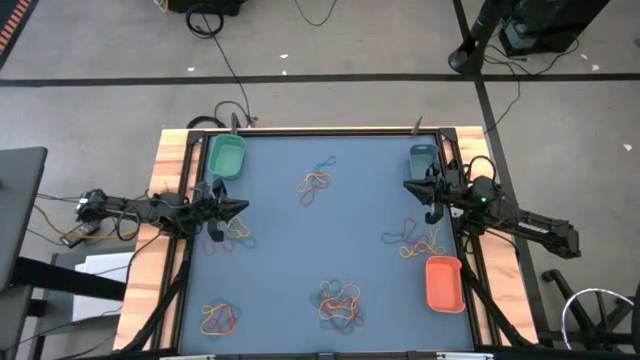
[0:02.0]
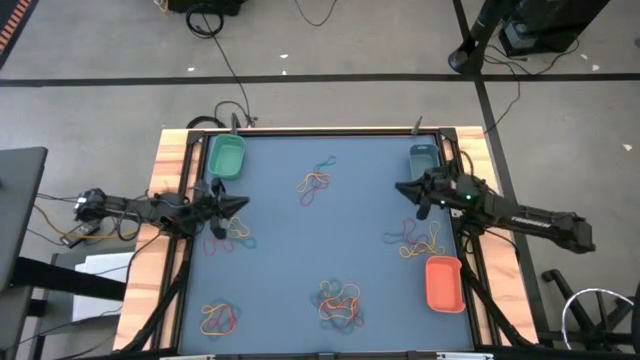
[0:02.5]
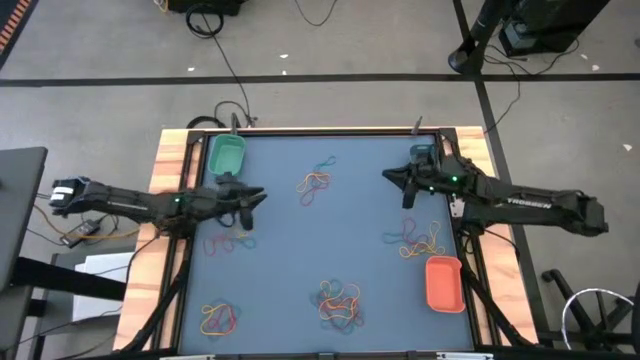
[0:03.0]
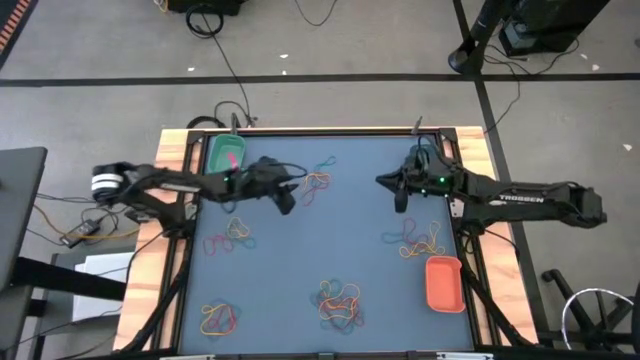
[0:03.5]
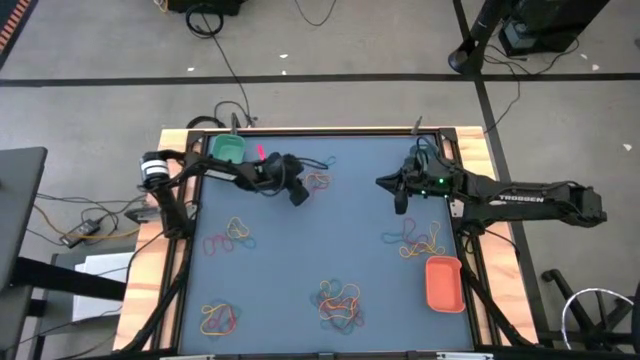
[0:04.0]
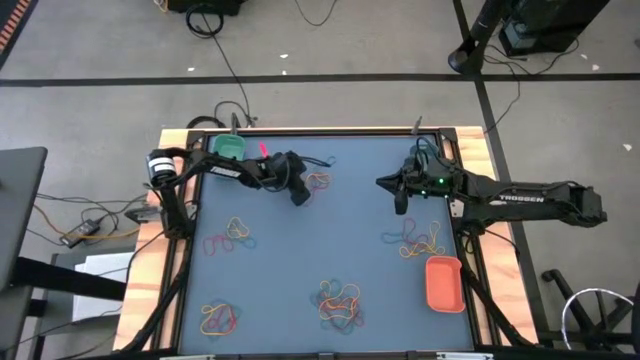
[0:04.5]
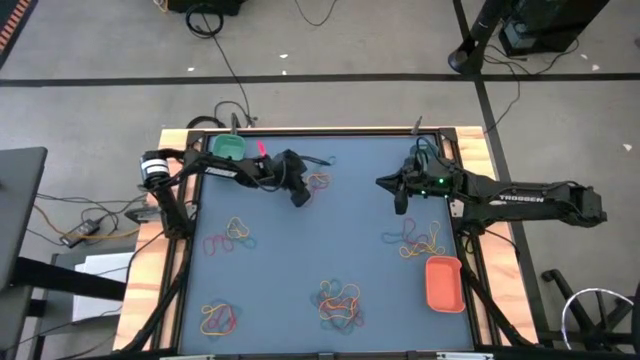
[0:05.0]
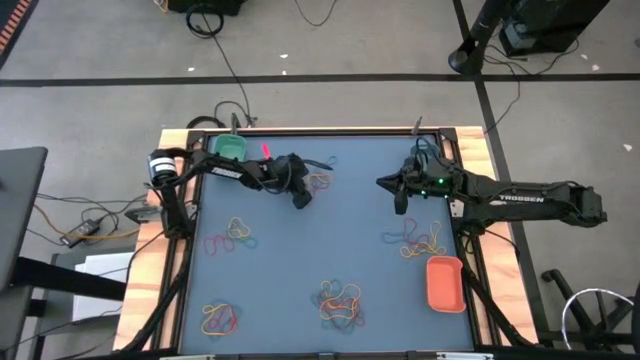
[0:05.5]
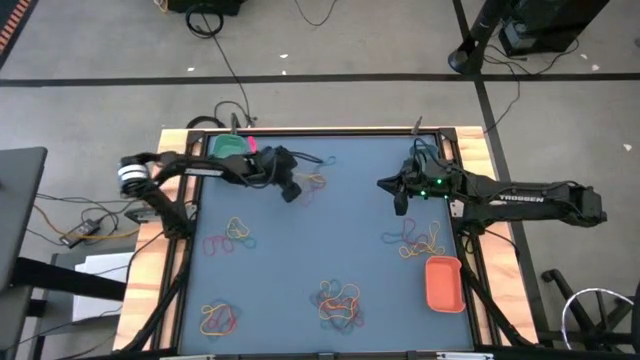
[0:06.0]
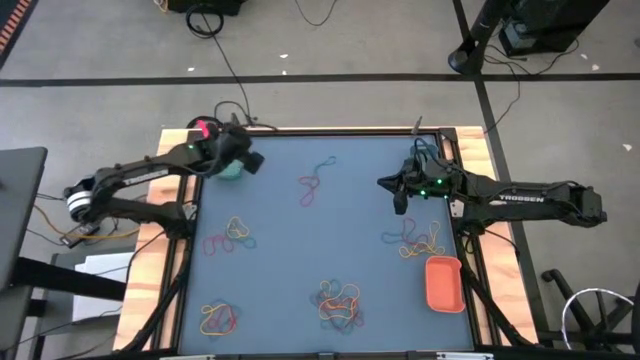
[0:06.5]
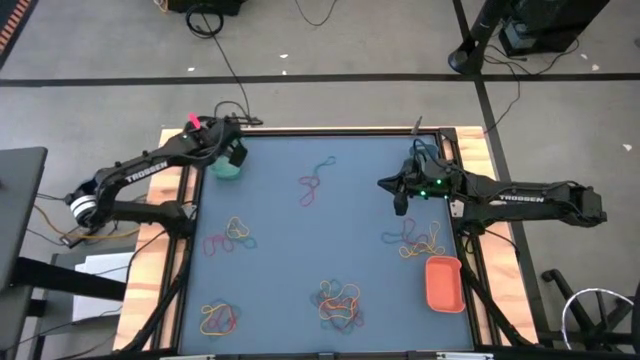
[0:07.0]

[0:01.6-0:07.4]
Task: Sort rubber bands into baskets
Put the yellow rubber band into the green bin

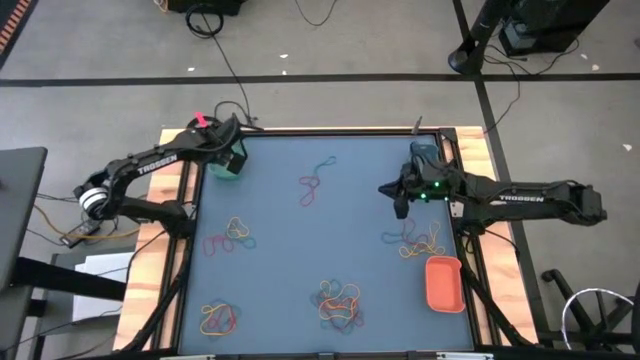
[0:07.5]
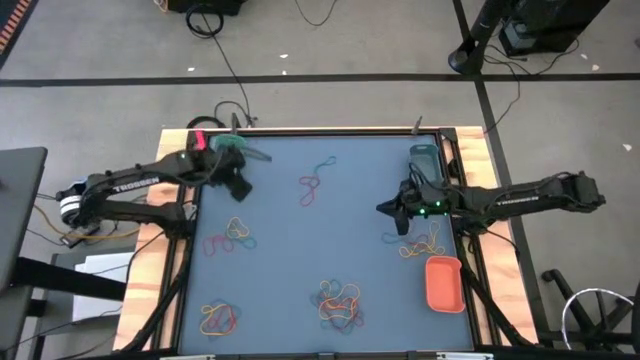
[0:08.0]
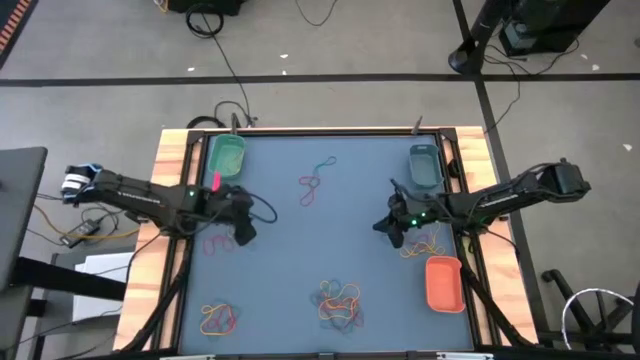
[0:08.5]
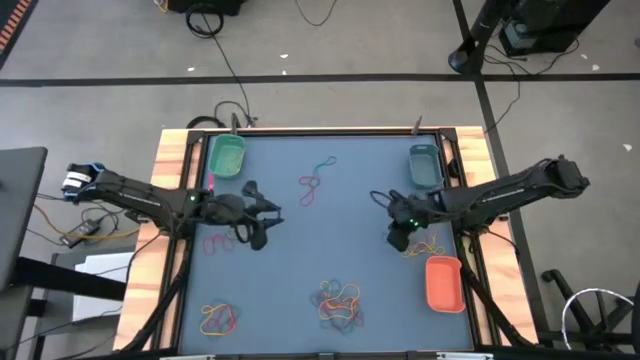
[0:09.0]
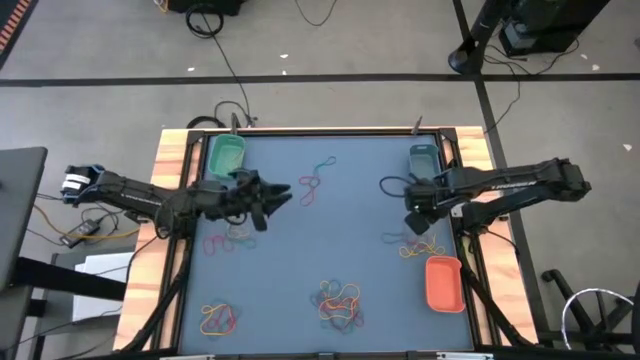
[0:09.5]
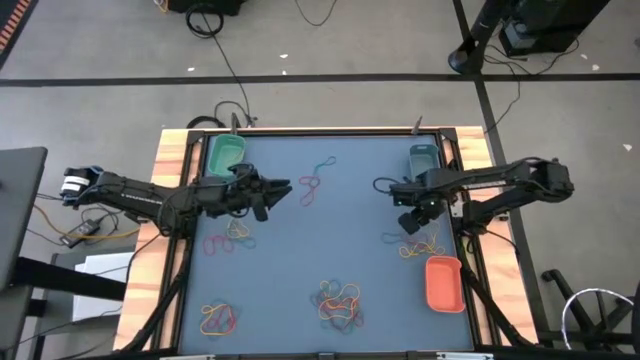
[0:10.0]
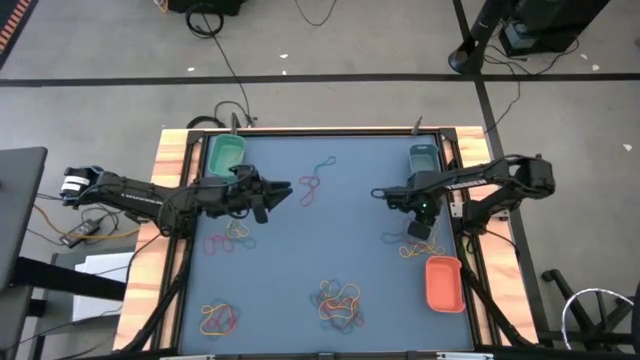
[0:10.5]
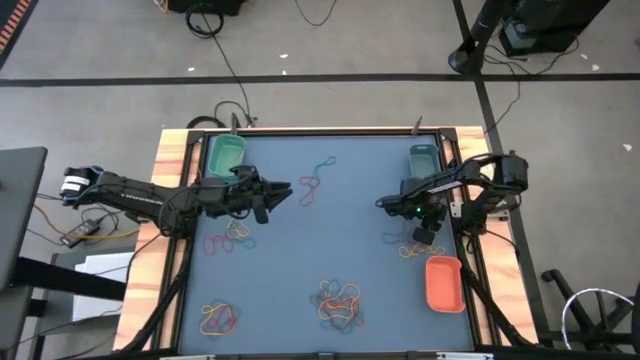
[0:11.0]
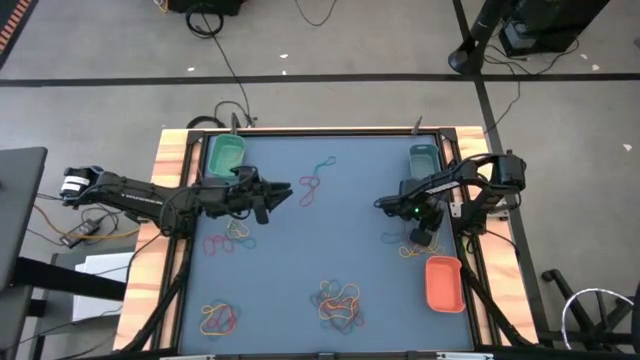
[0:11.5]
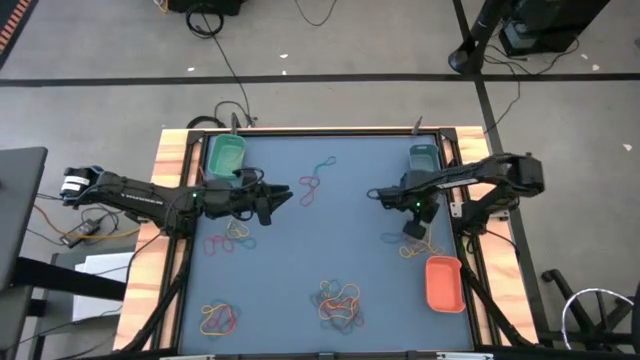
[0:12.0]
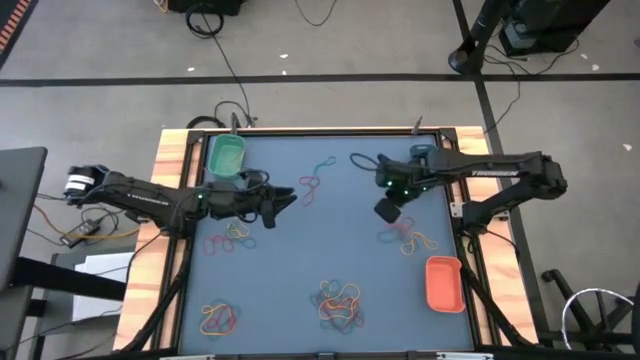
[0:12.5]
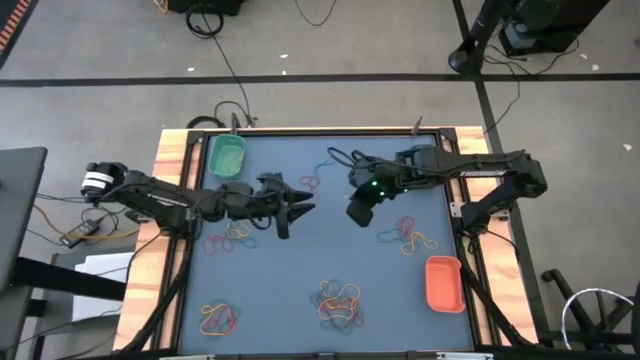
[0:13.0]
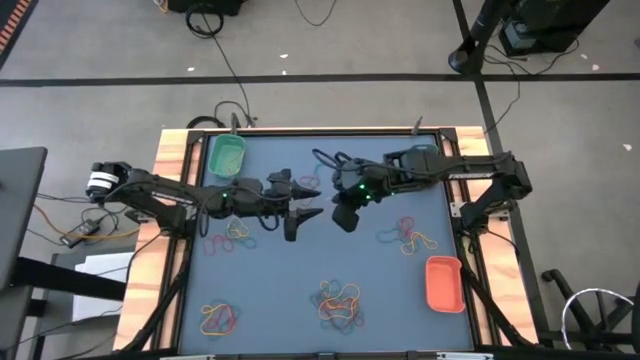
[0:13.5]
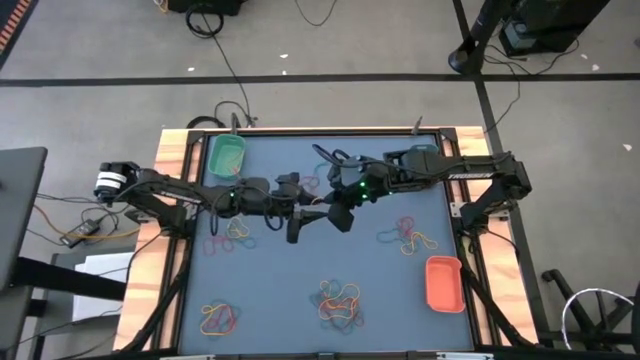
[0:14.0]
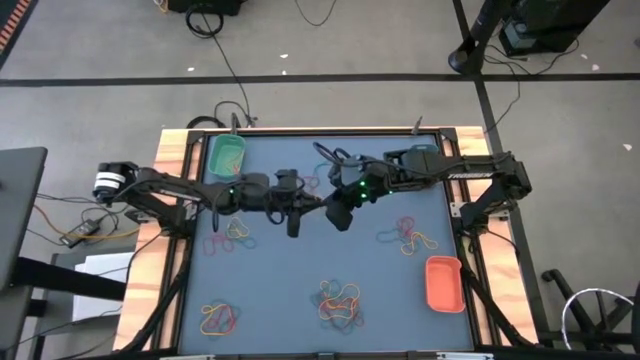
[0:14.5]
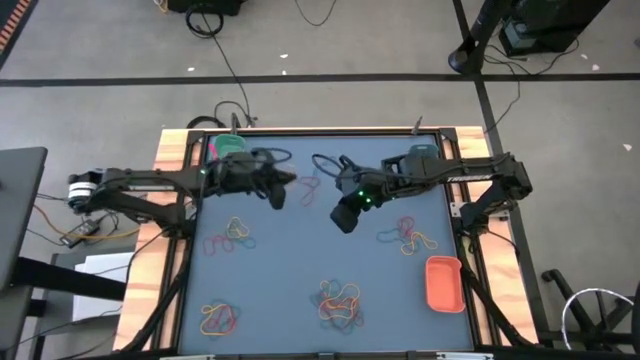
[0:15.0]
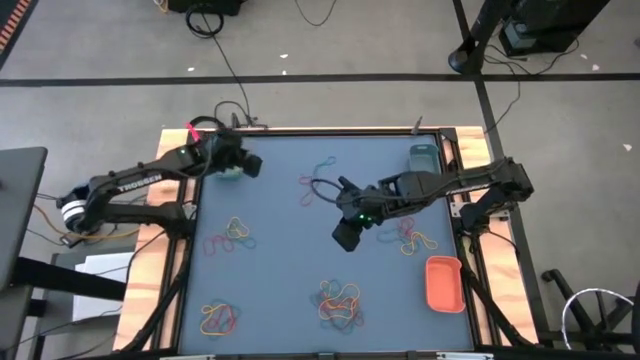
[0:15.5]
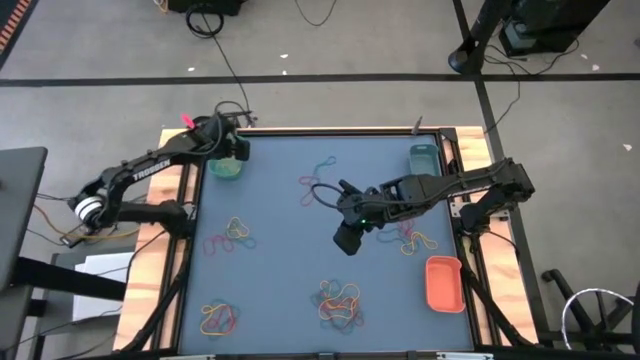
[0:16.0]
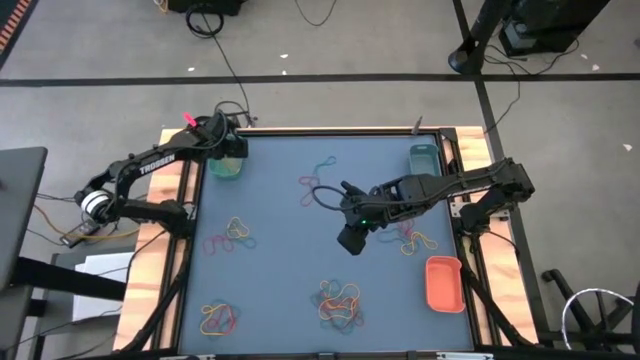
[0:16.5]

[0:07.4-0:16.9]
Put the yellow rubber band into the green bin

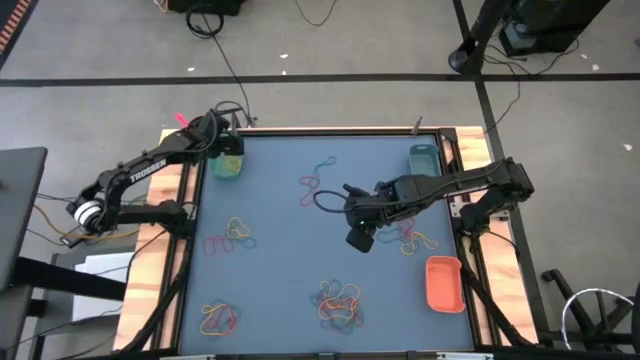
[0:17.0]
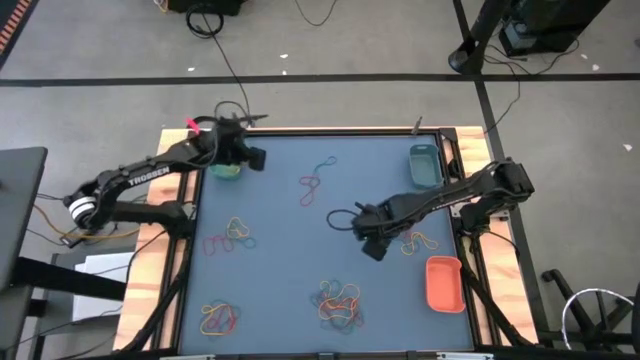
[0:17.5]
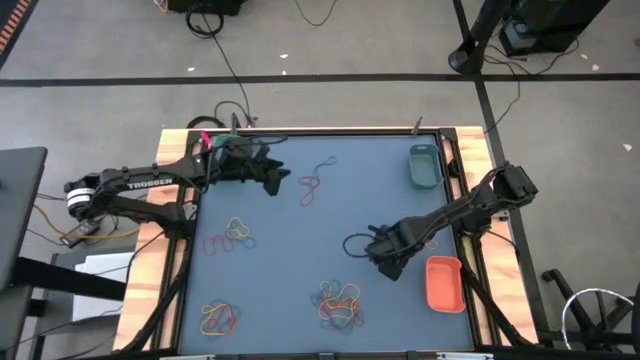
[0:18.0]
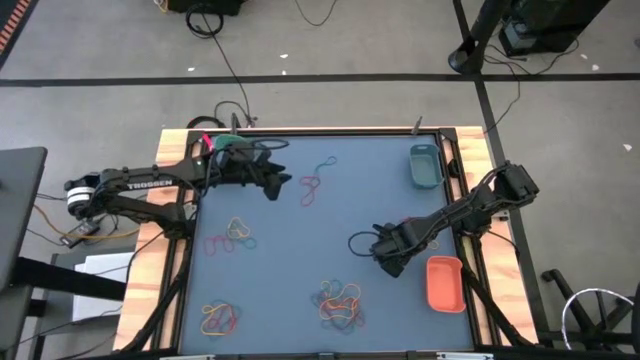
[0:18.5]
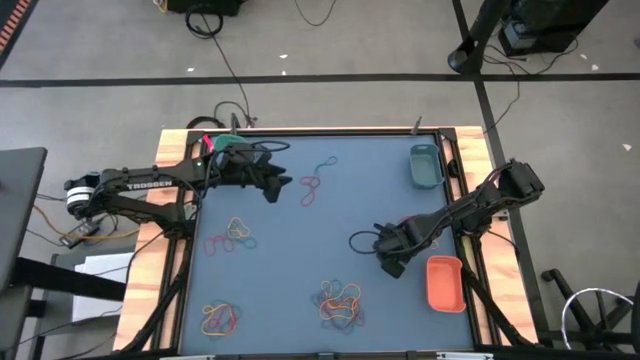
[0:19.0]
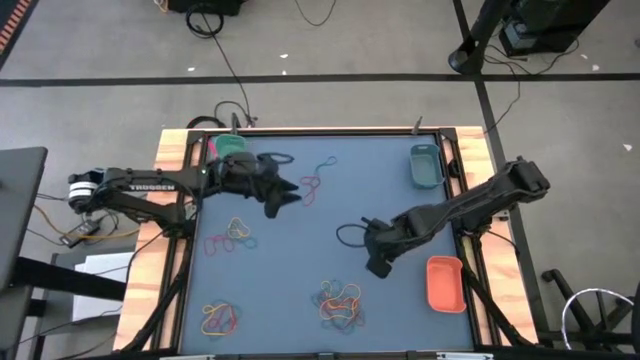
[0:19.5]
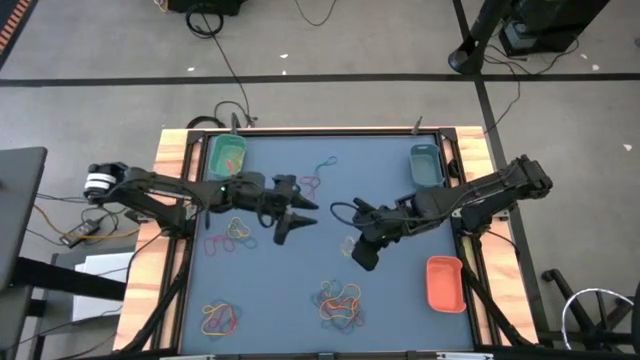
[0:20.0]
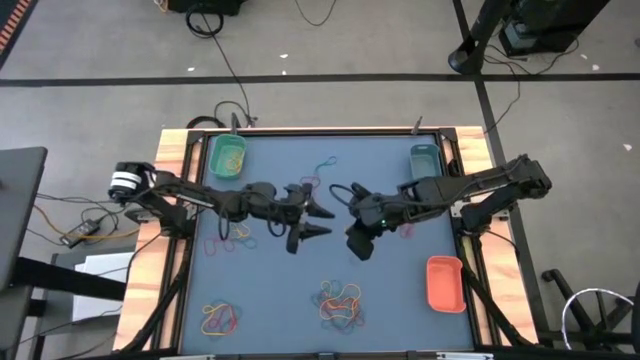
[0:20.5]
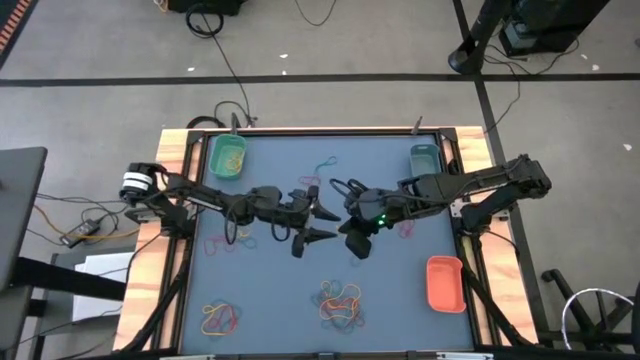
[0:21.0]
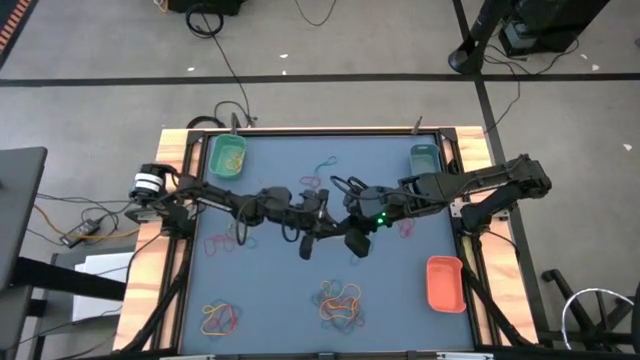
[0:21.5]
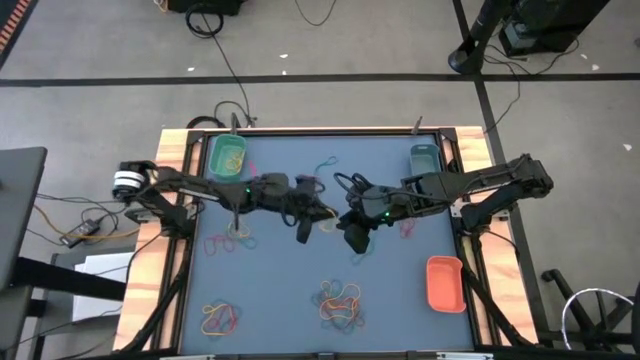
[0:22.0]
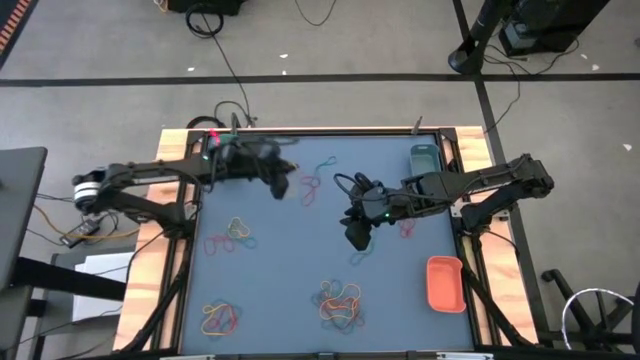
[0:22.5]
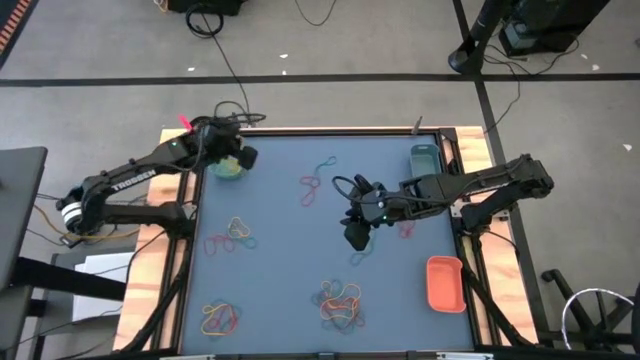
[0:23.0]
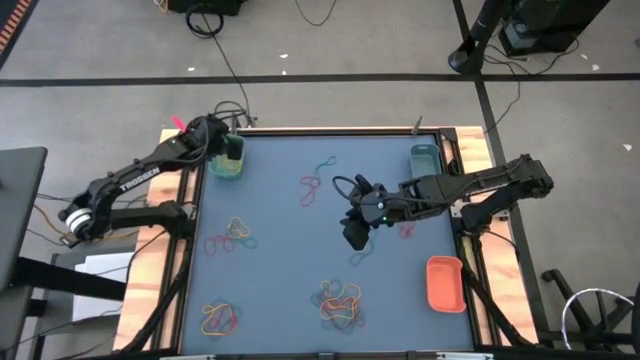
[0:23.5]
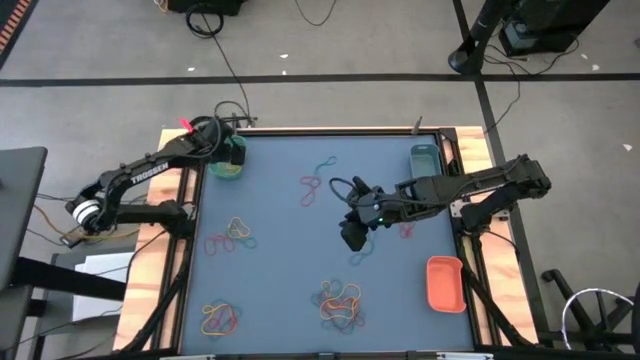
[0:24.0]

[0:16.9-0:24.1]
Put the yellow rubber band into the green bin
